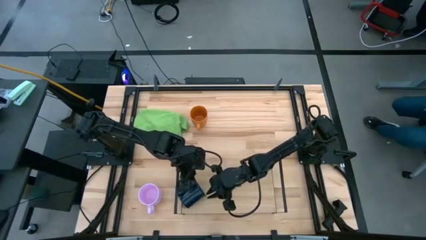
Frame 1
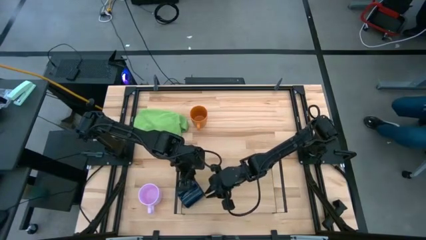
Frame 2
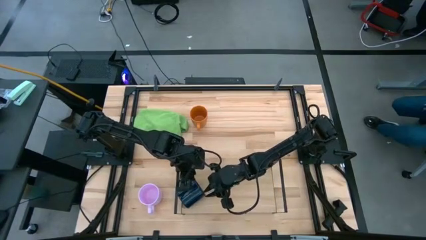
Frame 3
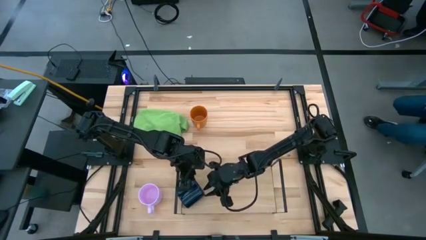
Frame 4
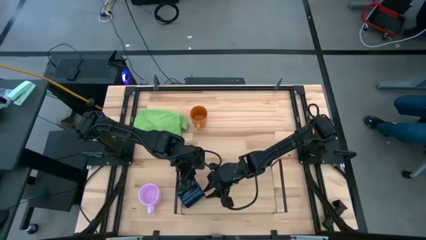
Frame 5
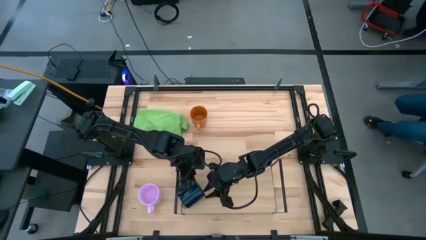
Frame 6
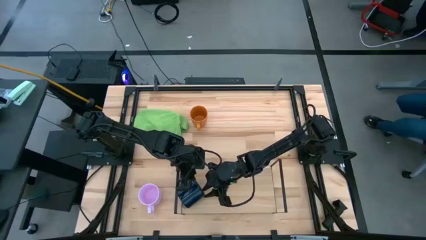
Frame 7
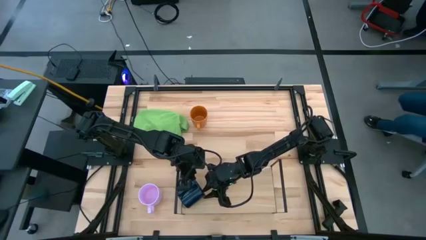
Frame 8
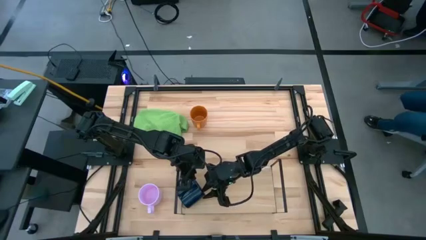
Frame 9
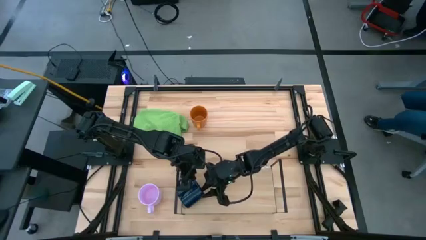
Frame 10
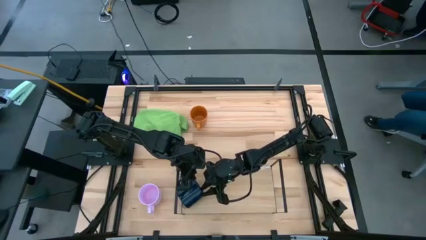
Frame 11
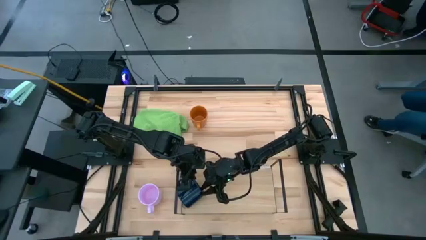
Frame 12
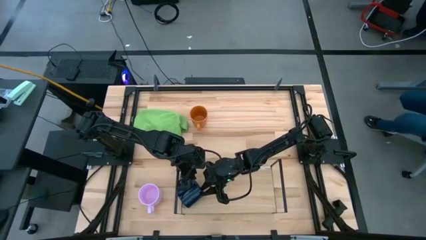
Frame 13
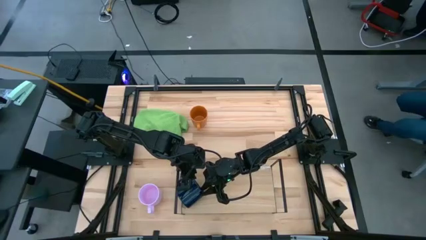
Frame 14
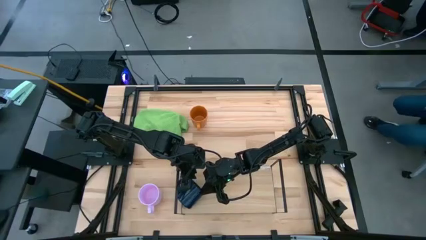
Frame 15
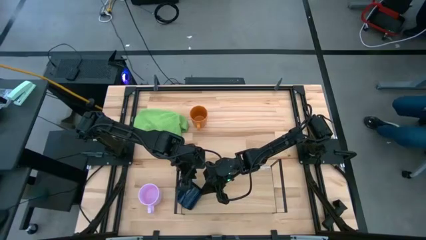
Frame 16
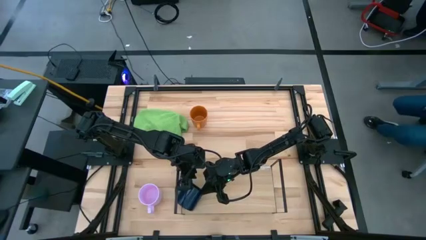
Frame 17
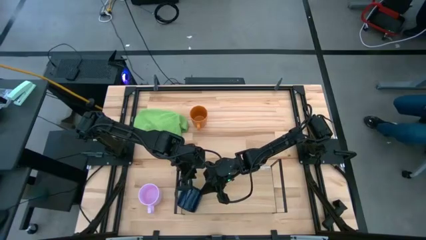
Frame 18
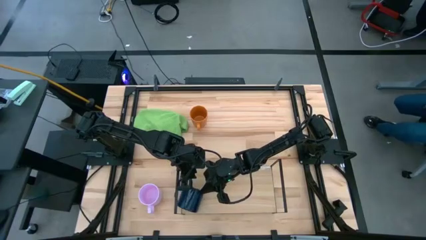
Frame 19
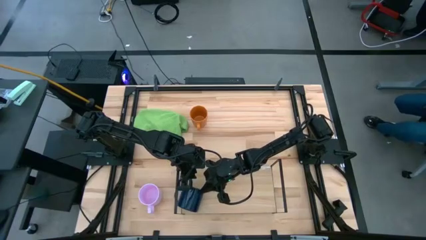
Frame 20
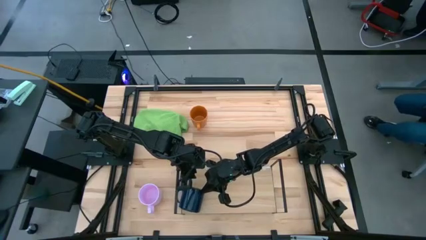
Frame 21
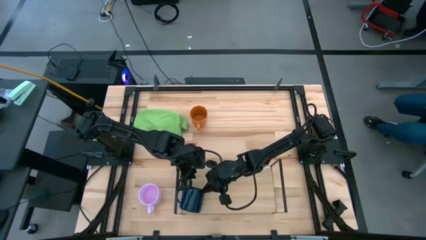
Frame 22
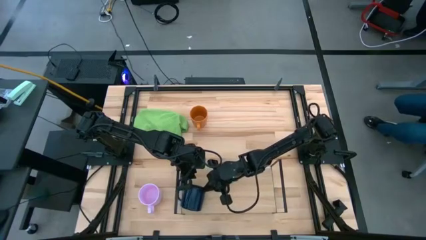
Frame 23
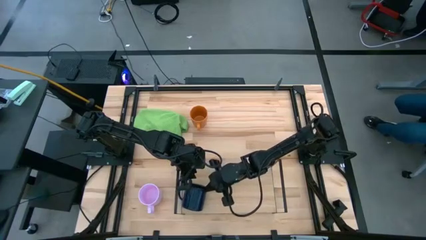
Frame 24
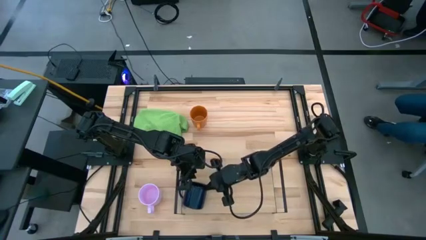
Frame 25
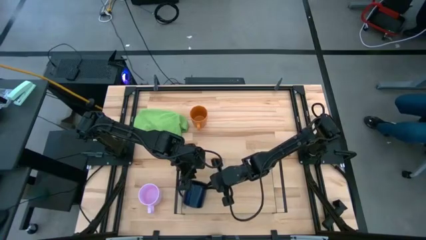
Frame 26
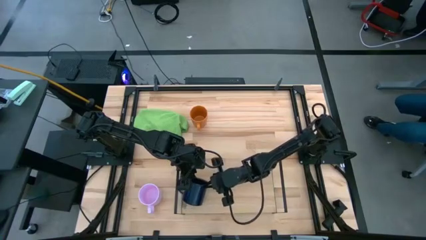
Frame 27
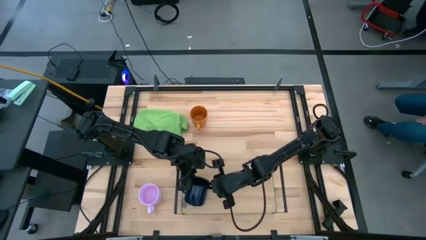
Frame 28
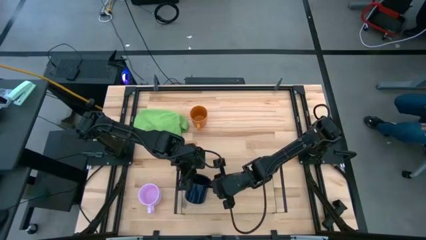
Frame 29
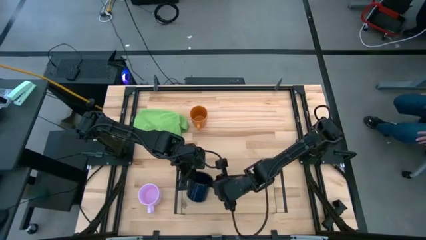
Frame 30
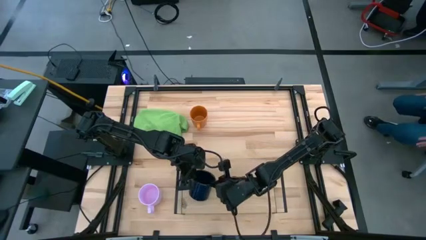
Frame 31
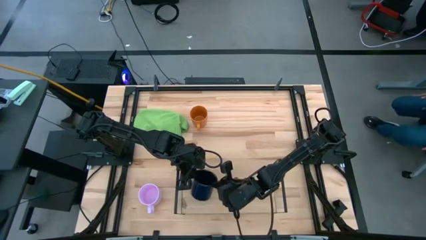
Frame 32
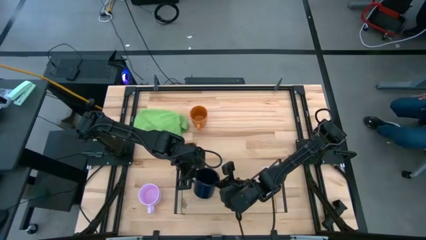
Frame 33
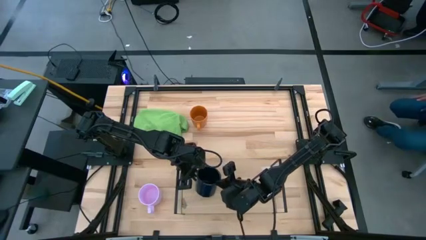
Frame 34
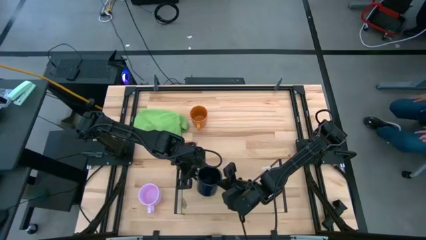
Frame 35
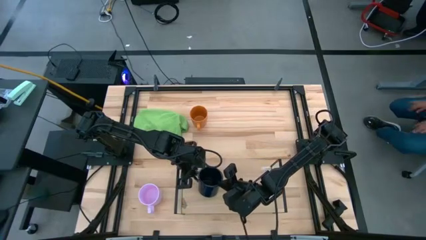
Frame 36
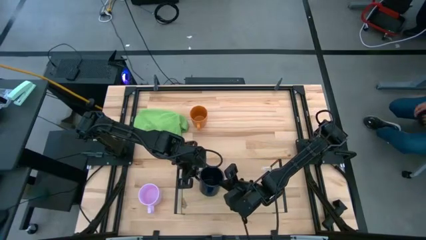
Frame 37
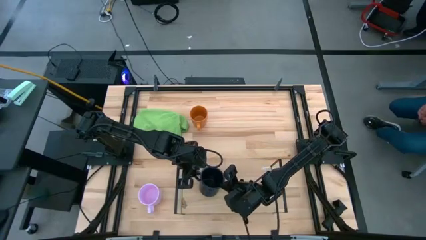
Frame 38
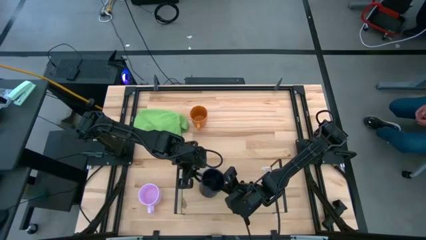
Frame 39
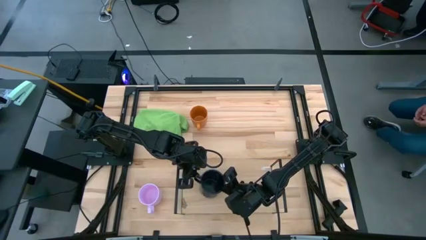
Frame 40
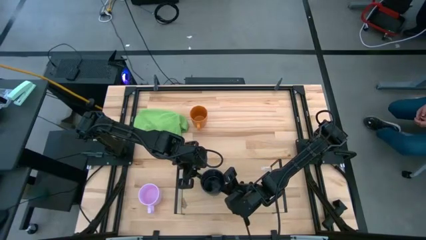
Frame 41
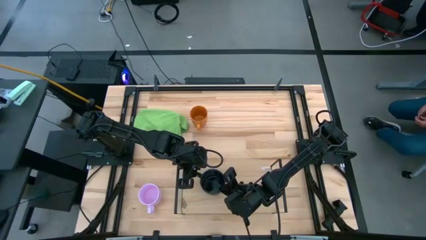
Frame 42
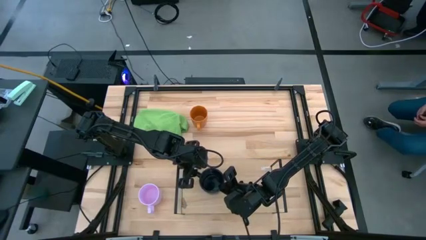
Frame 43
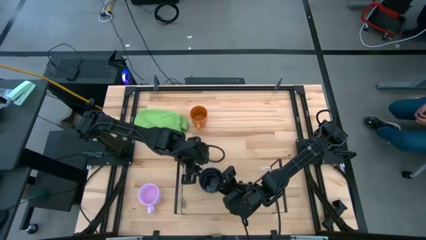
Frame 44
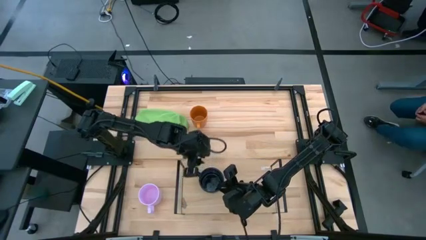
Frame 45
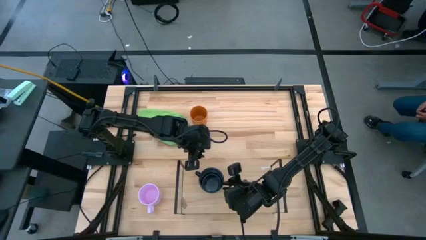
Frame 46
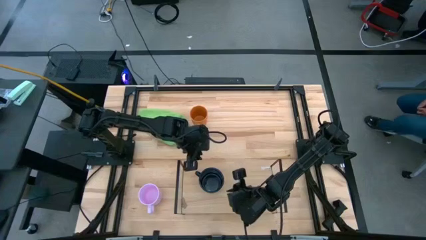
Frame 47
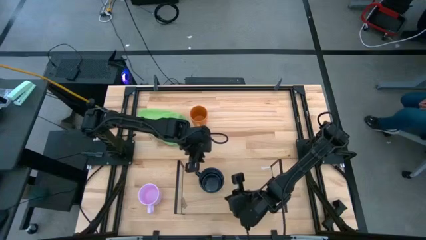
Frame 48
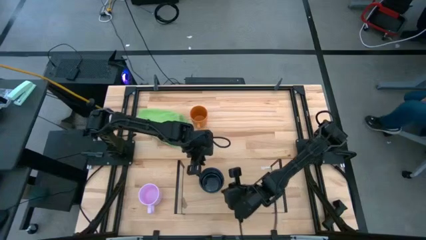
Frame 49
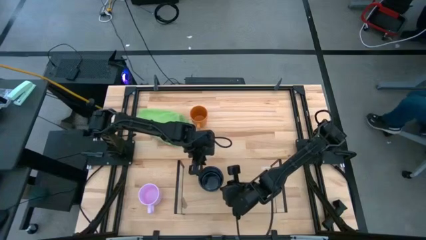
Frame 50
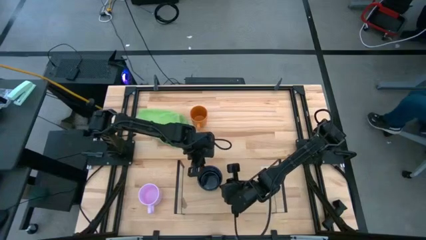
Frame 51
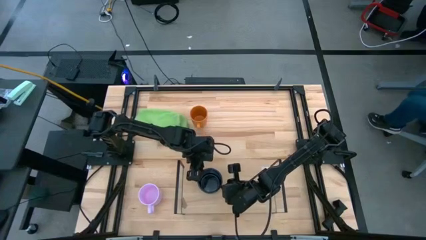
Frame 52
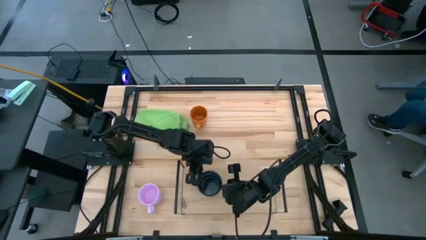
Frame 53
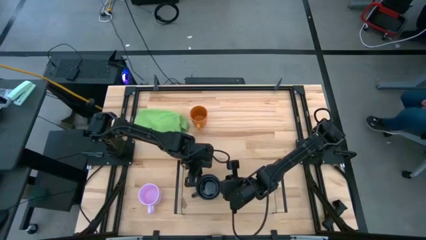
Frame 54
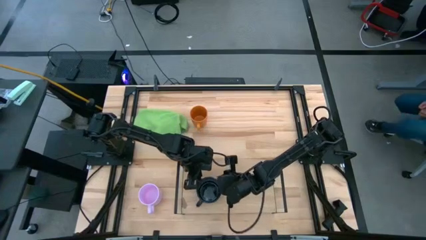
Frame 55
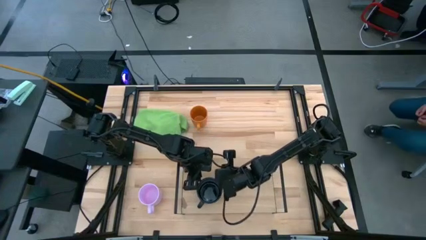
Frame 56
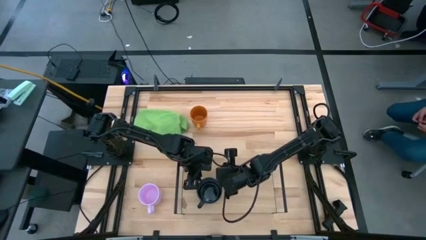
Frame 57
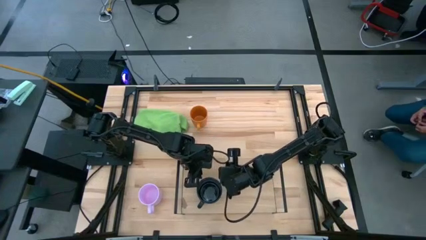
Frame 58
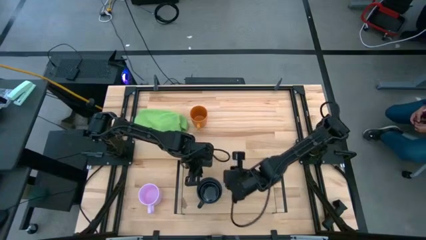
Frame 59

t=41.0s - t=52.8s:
Task: Stack small to large cups/mugs on shelf
Put the dark blue mug on the shelf
